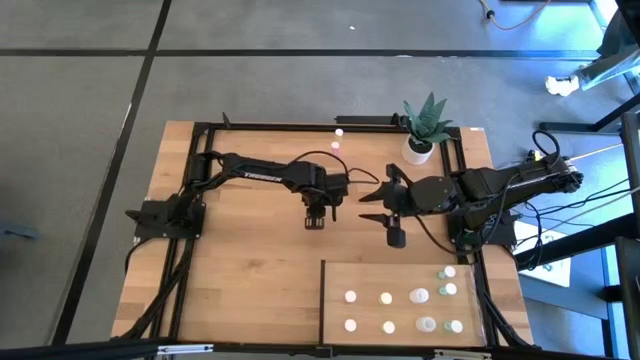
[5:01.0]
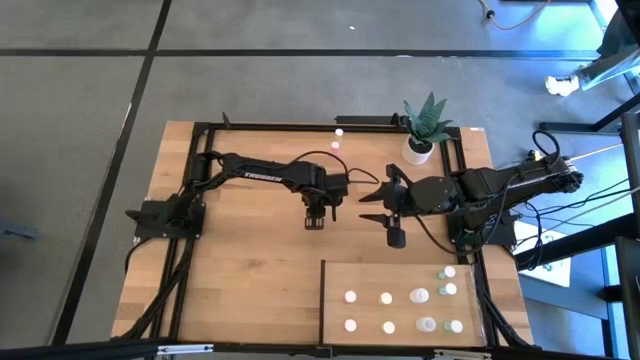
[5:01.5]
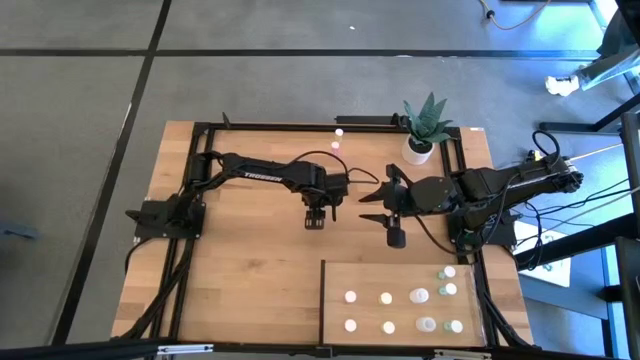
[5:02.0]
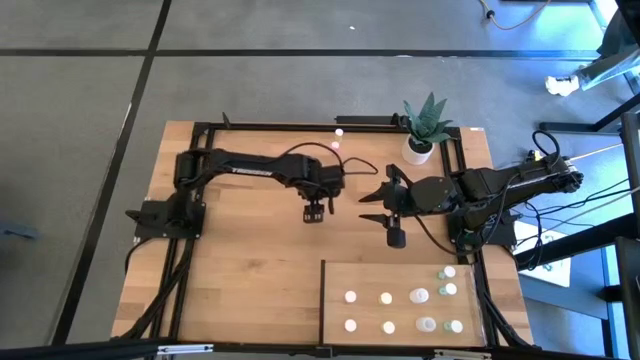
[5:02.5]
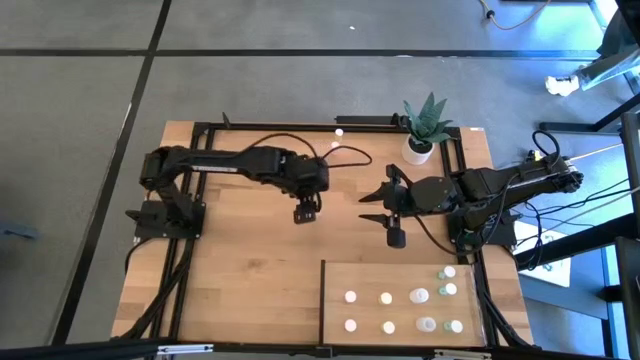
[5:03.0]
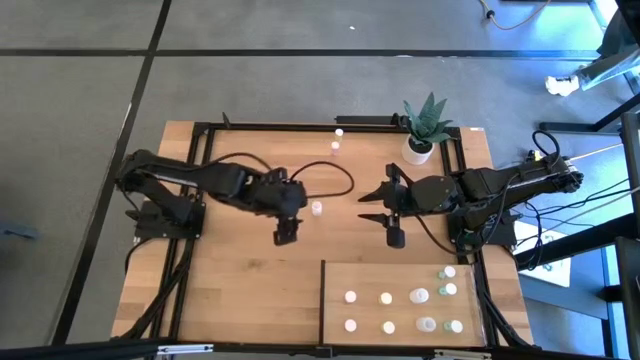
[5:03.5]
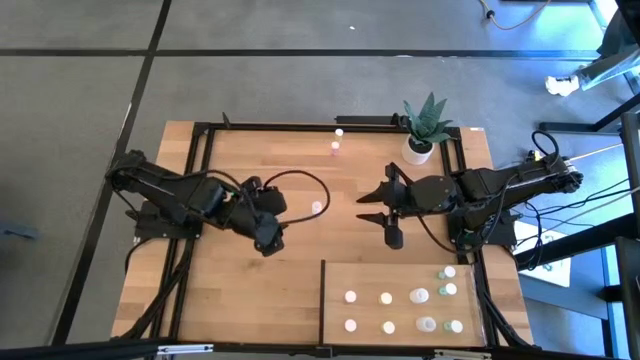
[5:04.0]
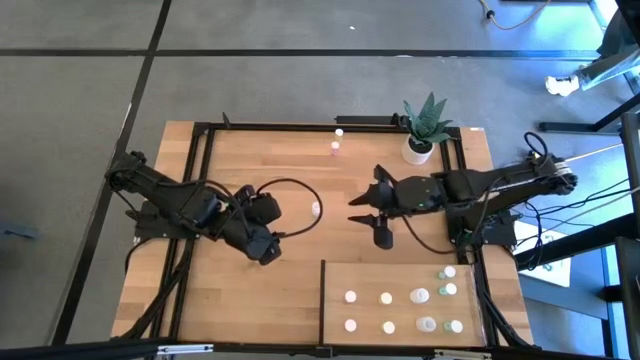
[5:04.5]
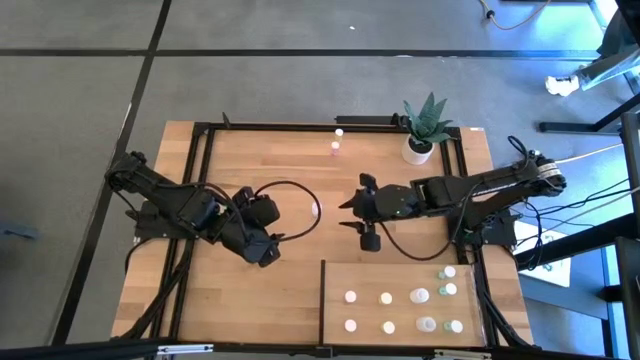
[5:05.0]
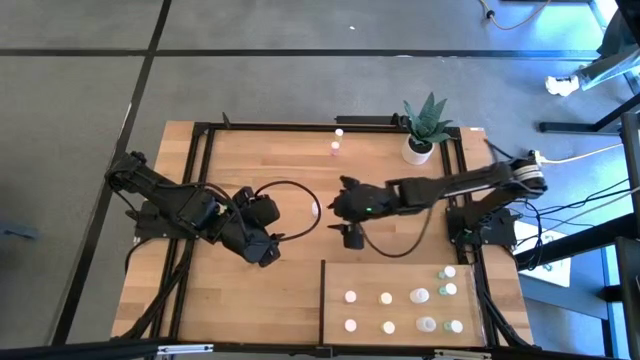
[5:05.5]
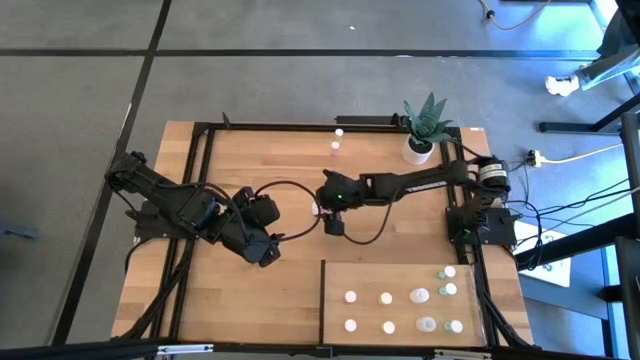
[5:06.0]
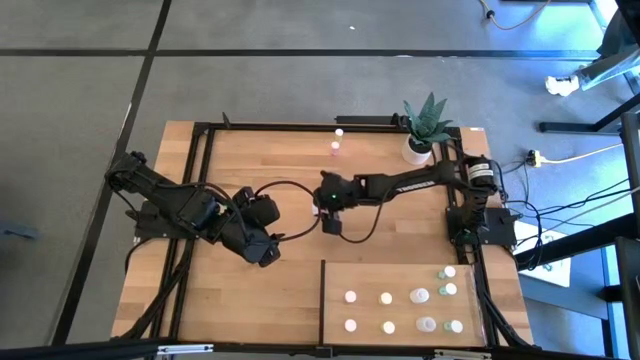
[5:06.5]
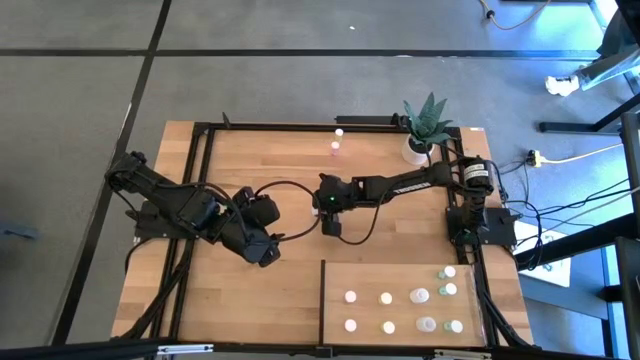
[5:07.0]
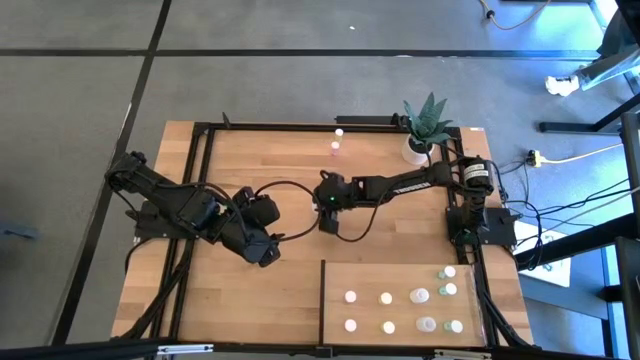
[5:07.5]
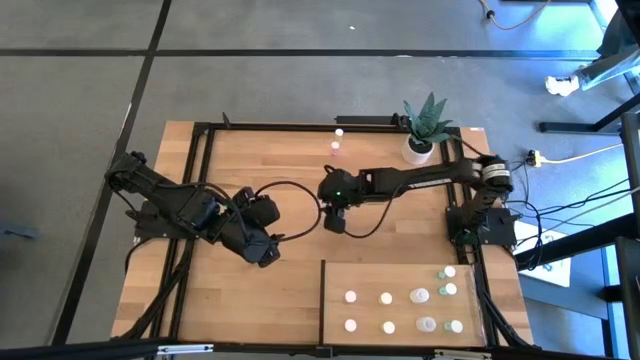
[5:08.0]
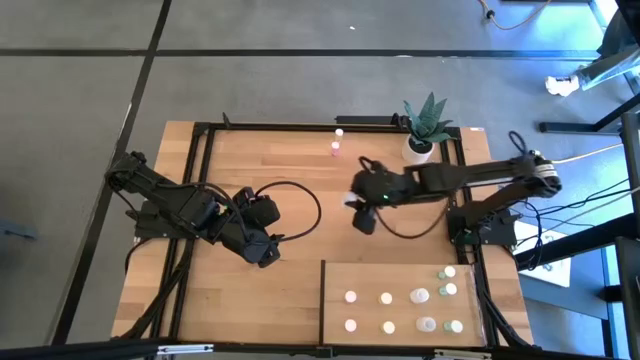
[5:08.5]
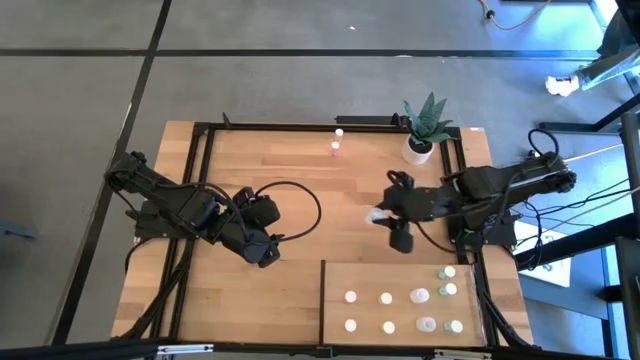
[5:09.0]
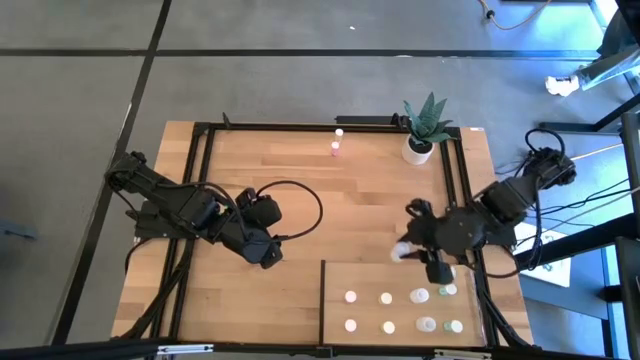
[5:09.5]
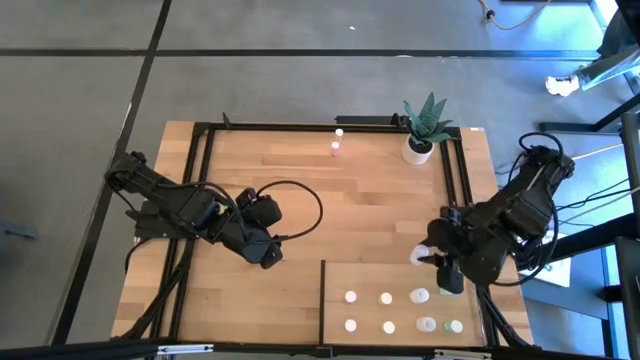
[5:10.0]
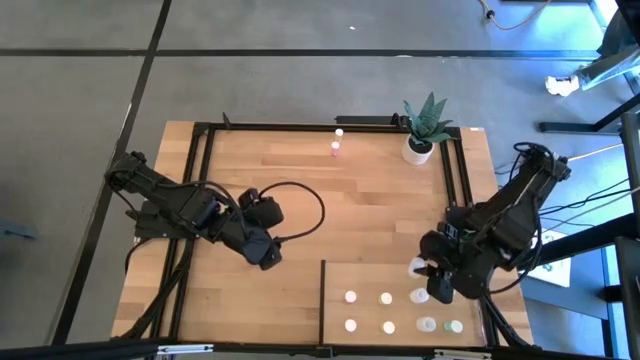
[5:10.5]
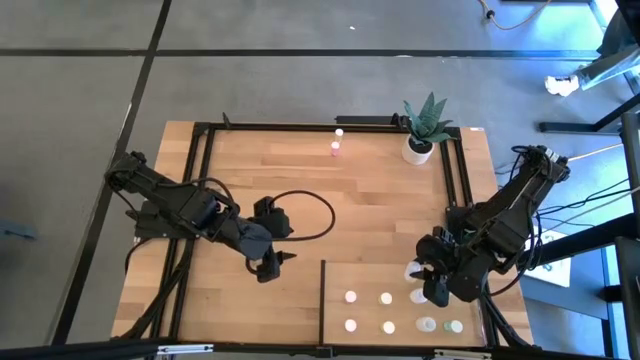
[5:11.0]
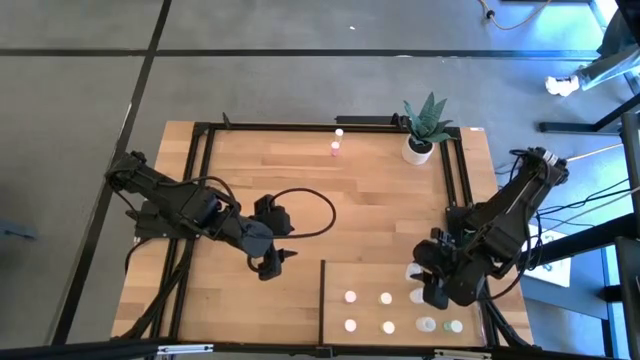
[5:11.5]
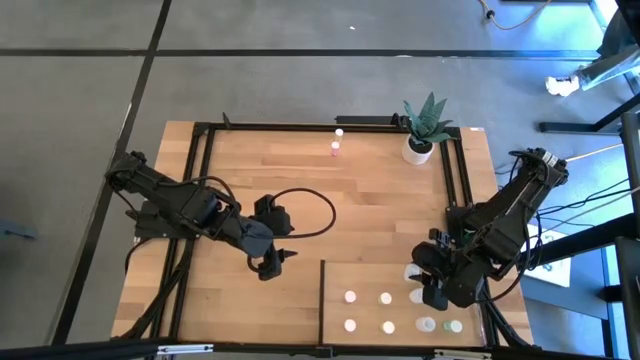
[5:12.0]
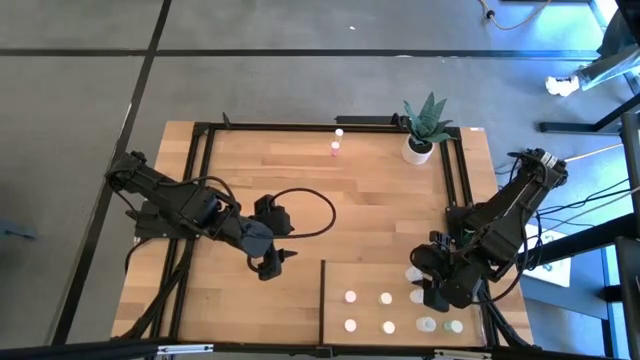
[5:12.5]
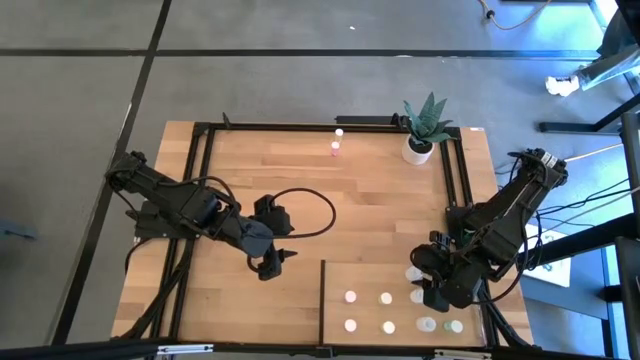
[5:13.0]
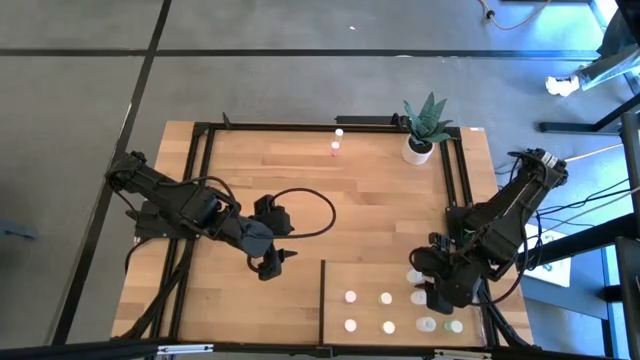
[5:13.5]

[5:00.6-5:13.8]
Task: Pick and place medicine bottles onto shelf by color
Put the transparent pill bottle on the shelf aligned with the other transparent pill bottle

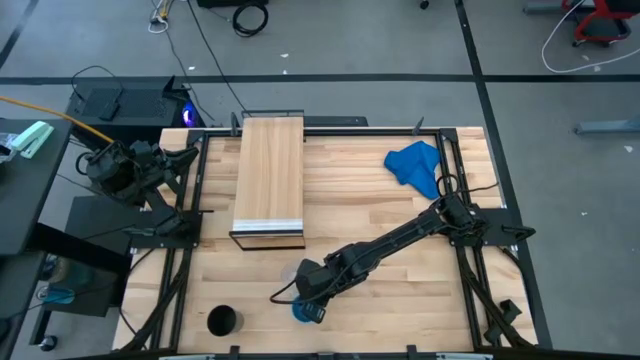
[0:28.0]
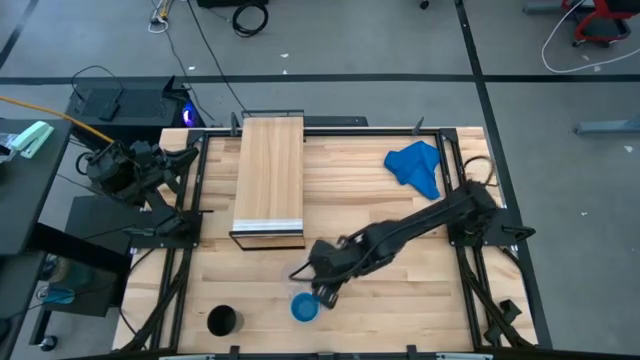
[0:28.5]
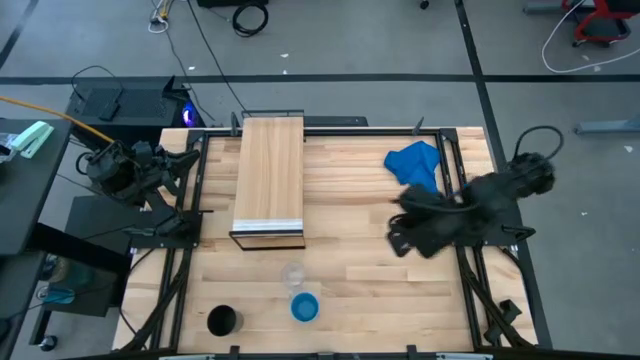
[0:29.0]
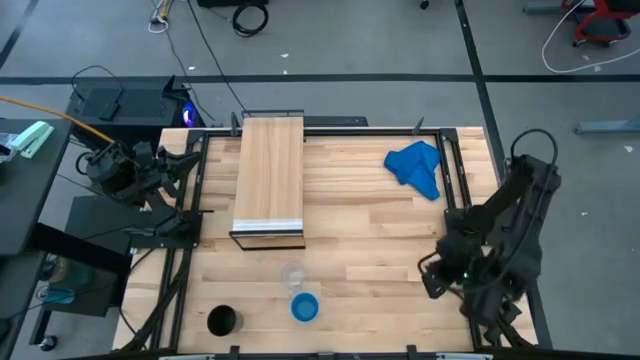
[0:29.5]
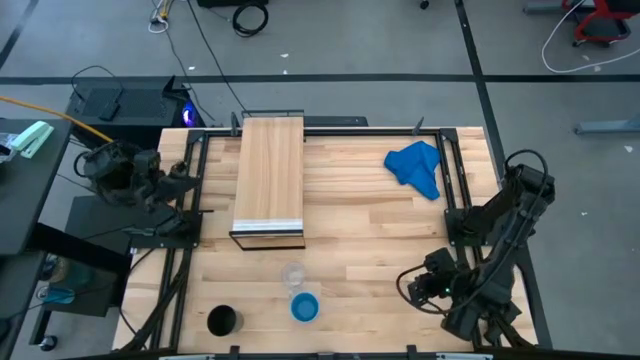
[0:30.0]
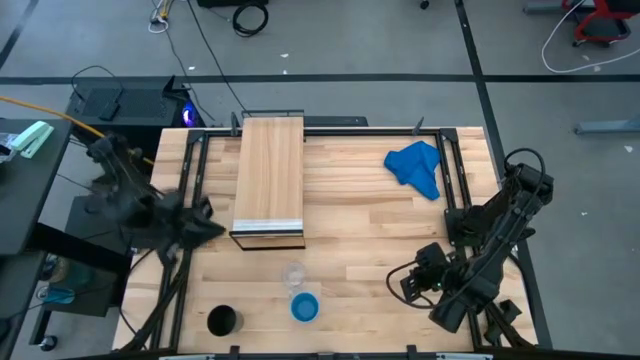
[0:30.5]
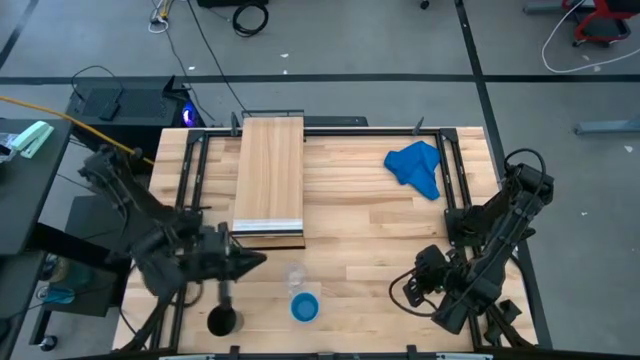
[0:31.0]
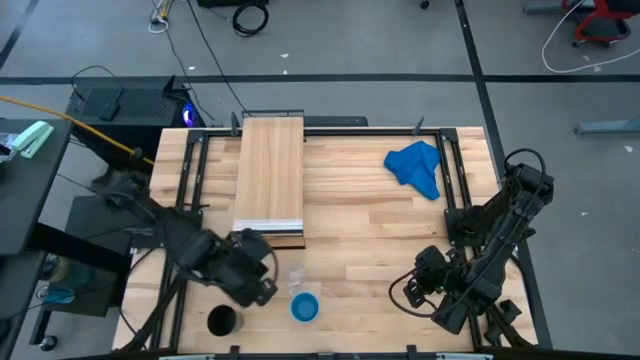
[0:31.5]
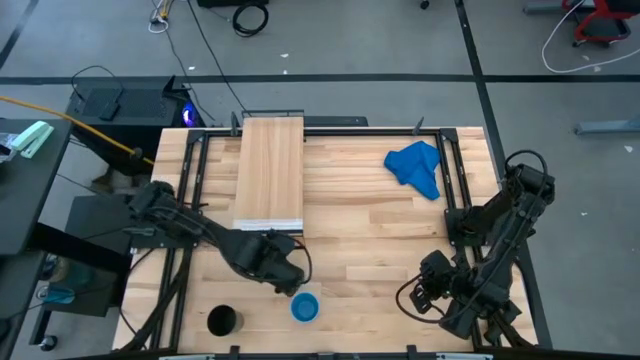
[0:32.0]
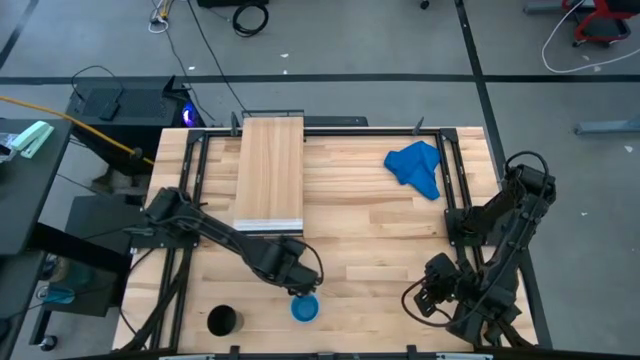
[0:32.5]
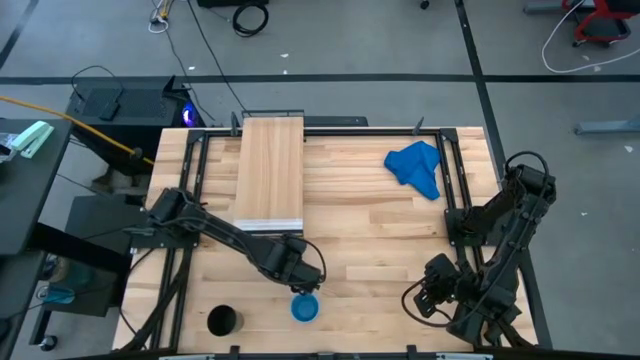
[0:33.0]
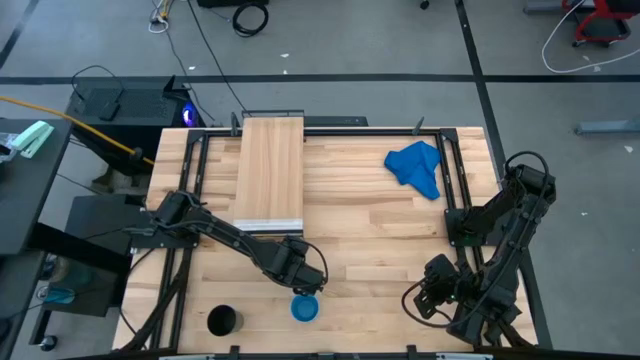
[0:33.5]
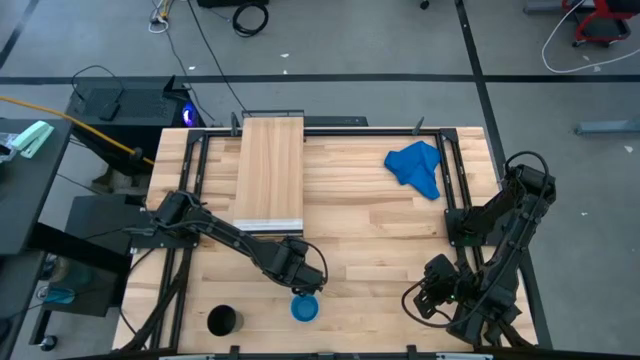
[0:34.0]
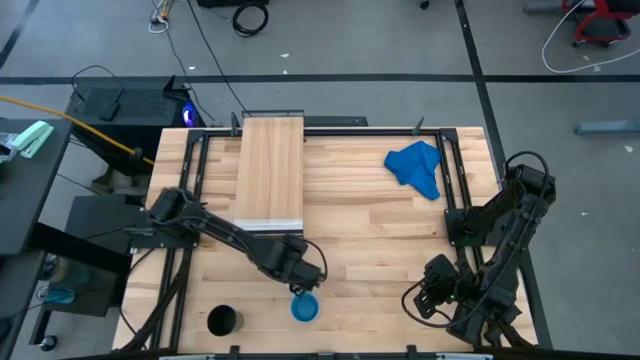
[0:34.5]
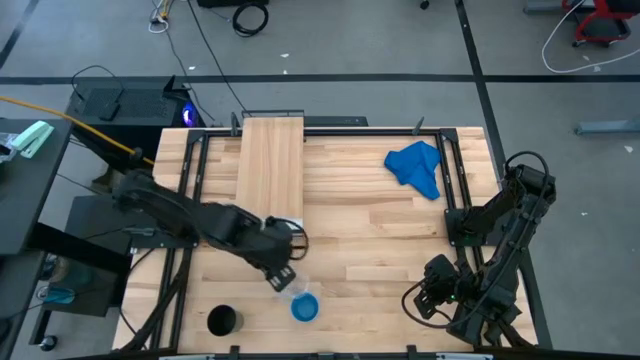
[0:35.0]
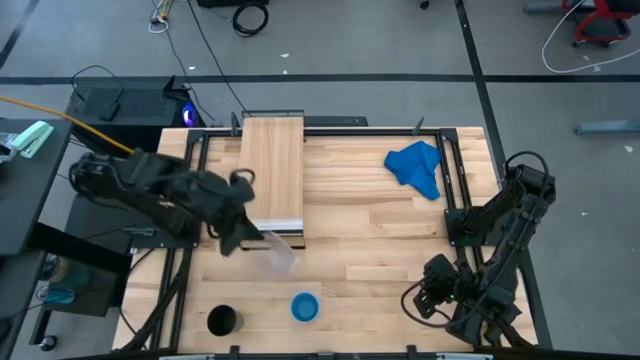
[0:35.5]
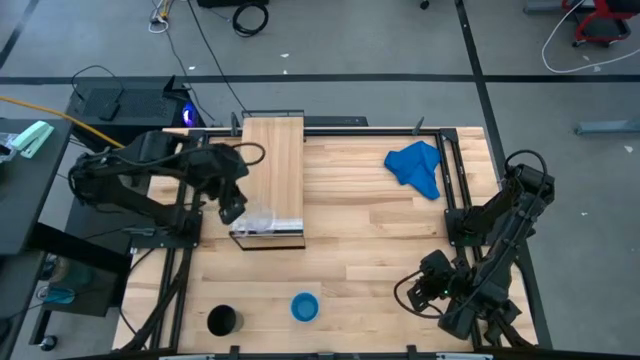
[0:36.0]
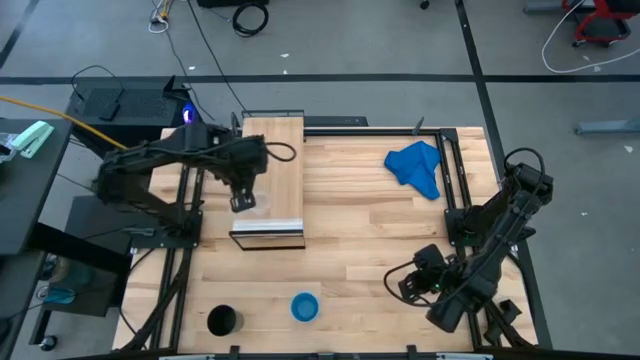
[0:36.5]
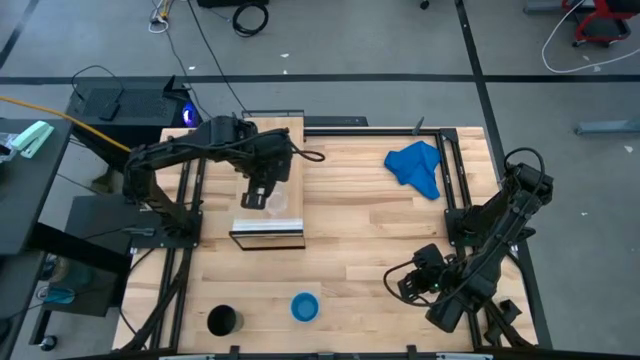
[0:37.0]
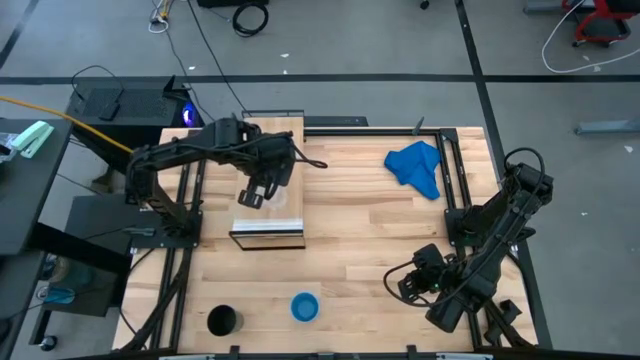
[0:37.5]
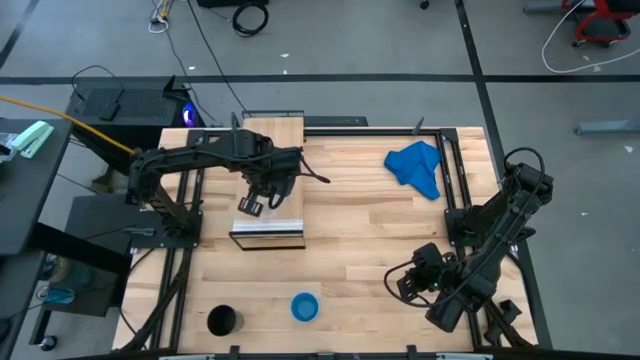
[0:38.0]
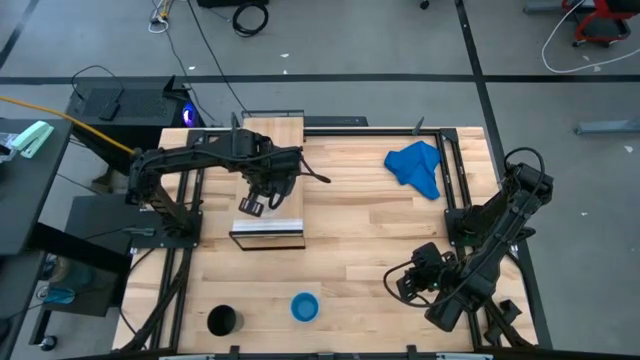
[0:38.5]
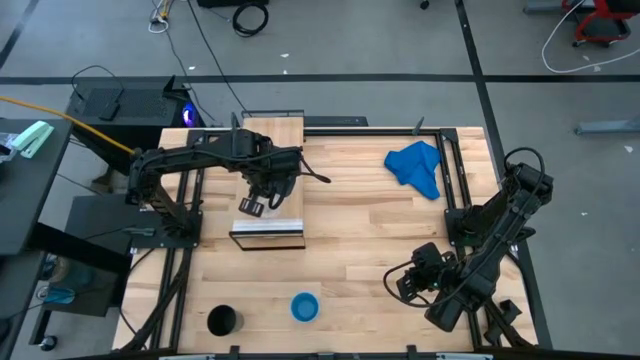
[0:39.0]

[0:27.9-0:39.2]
Task: Stack small to large cups/mugs on shelf
Put the transparent mug on the shelf
